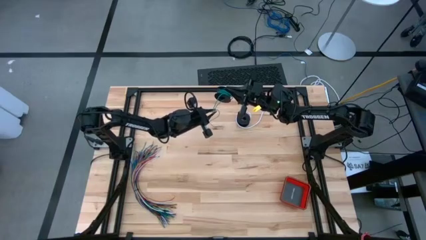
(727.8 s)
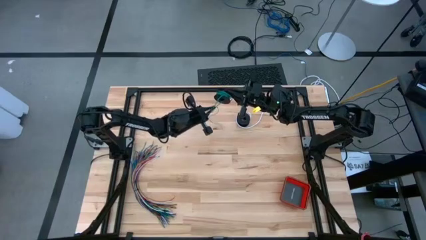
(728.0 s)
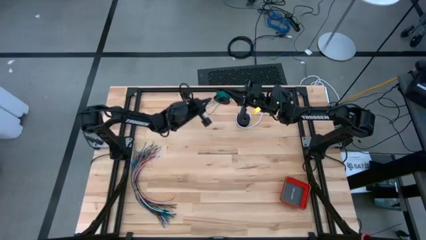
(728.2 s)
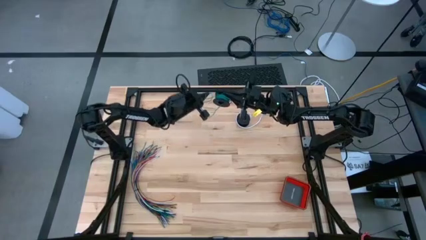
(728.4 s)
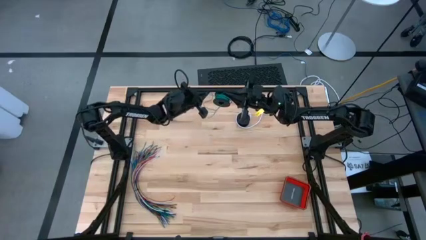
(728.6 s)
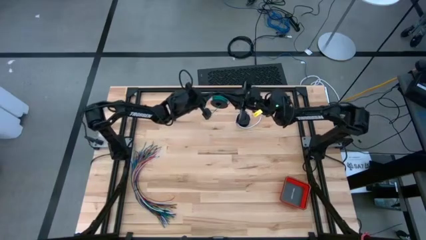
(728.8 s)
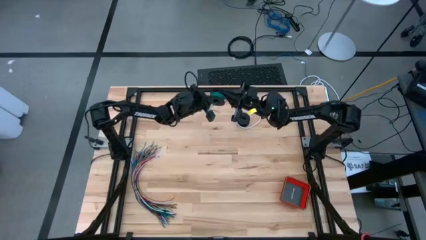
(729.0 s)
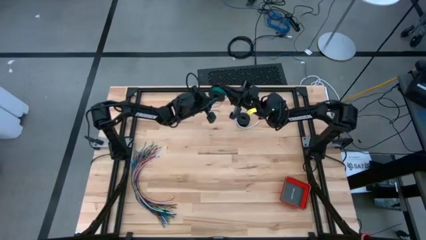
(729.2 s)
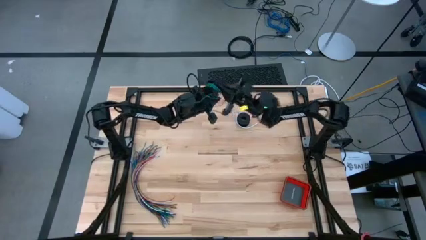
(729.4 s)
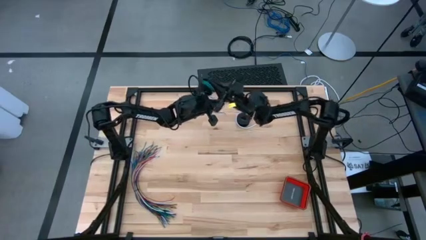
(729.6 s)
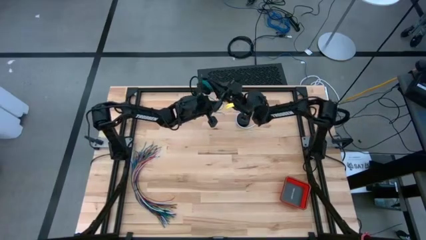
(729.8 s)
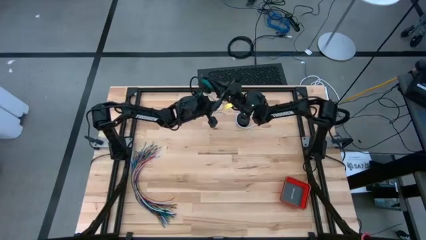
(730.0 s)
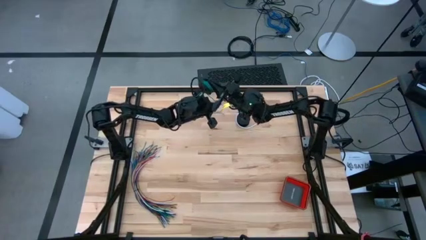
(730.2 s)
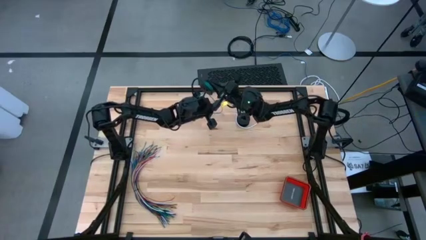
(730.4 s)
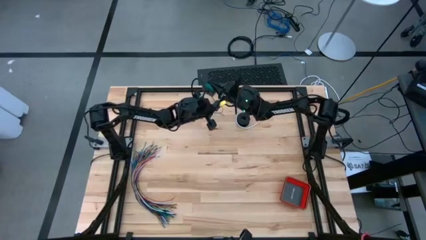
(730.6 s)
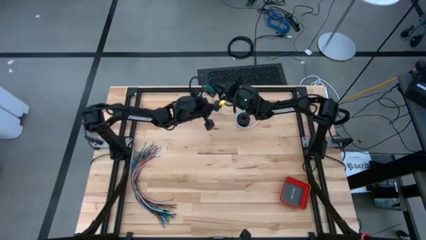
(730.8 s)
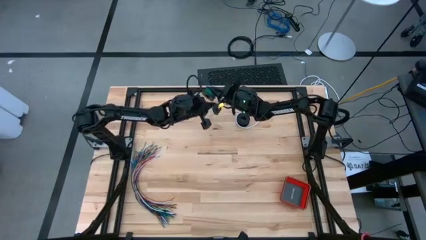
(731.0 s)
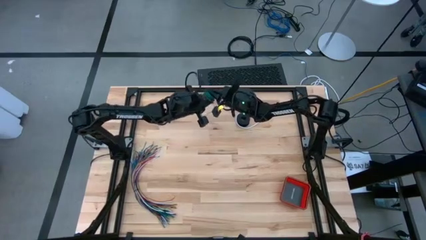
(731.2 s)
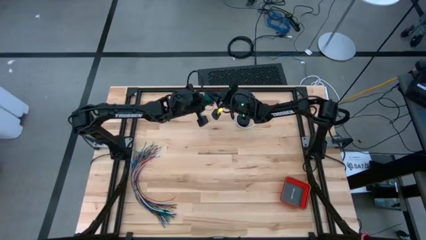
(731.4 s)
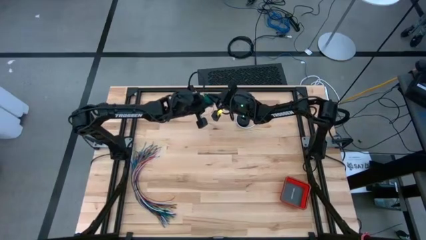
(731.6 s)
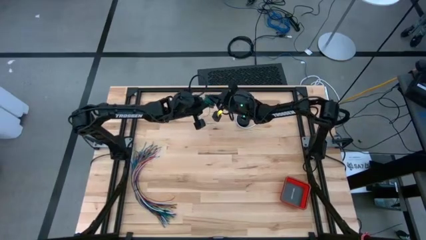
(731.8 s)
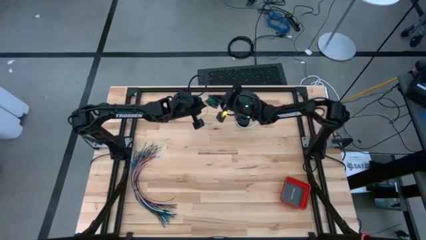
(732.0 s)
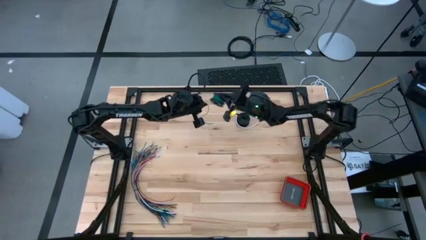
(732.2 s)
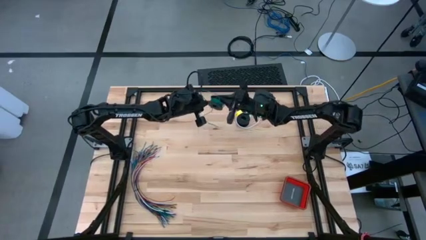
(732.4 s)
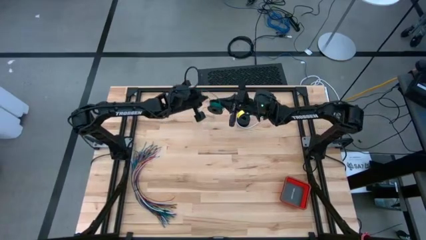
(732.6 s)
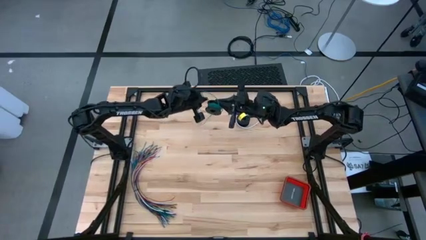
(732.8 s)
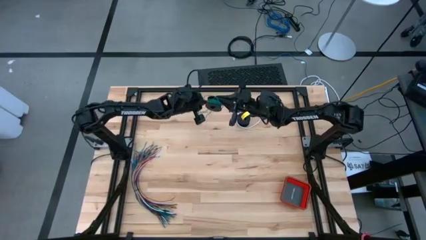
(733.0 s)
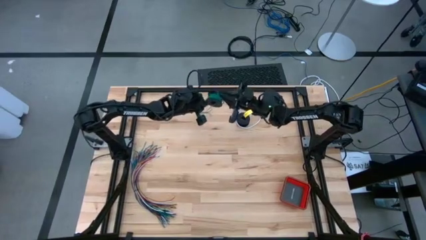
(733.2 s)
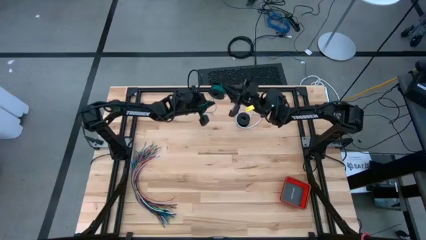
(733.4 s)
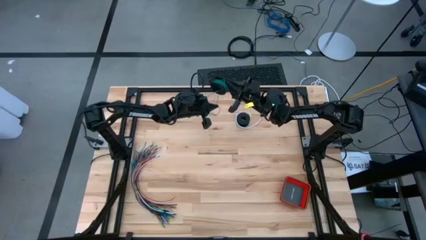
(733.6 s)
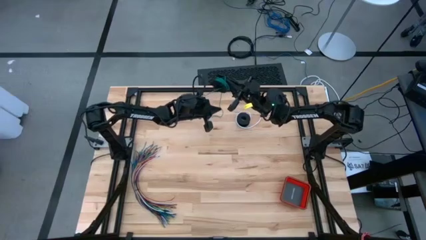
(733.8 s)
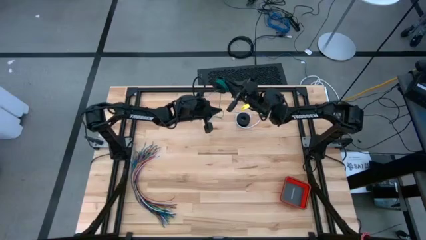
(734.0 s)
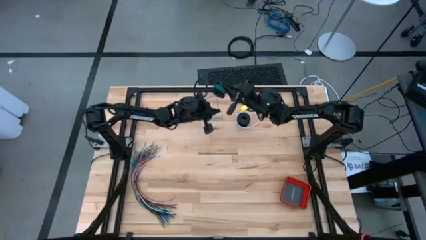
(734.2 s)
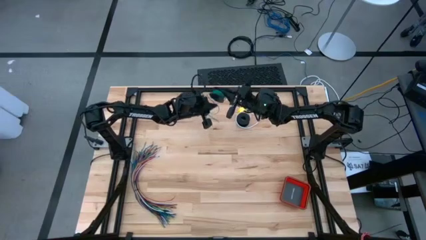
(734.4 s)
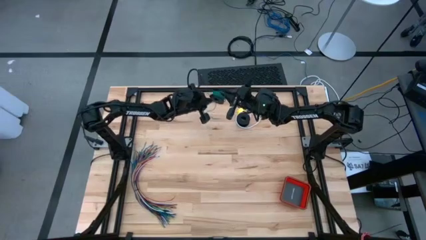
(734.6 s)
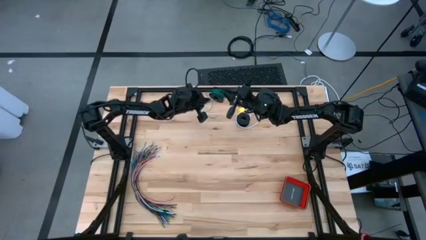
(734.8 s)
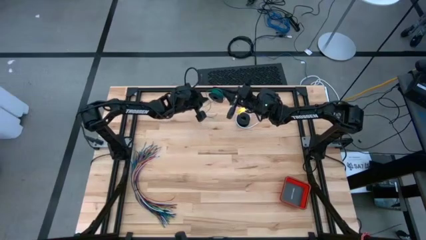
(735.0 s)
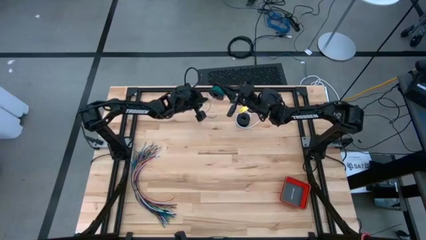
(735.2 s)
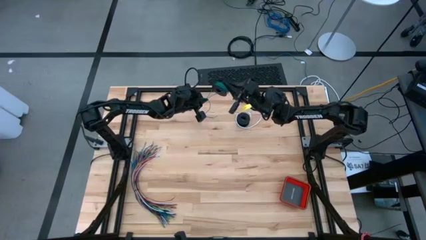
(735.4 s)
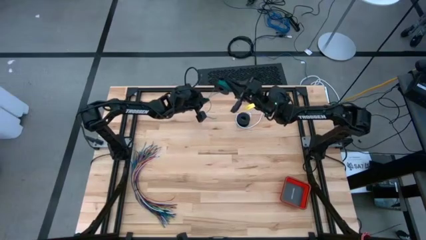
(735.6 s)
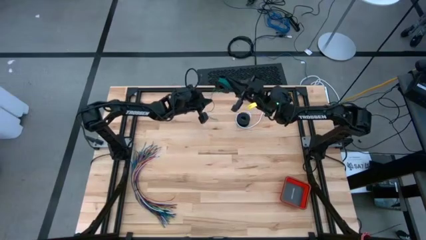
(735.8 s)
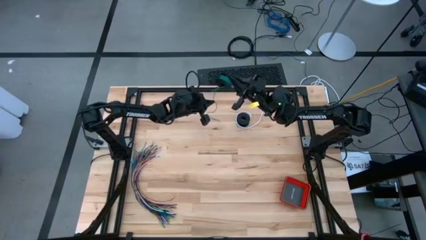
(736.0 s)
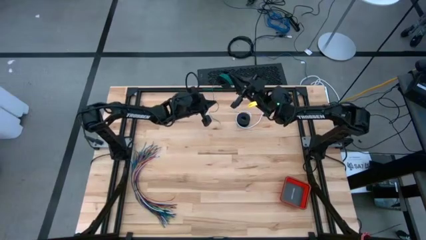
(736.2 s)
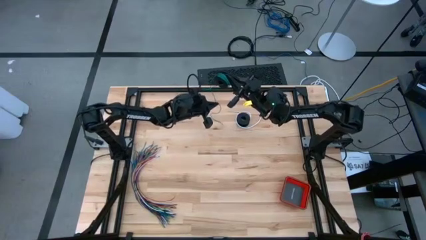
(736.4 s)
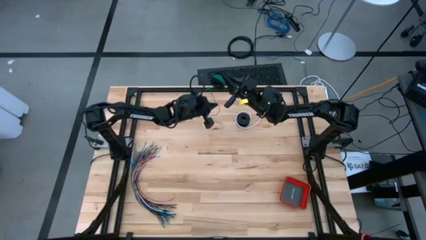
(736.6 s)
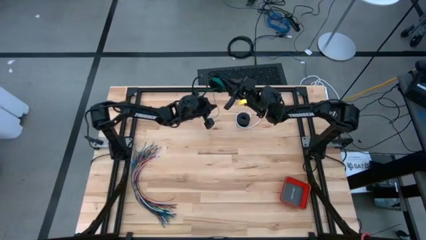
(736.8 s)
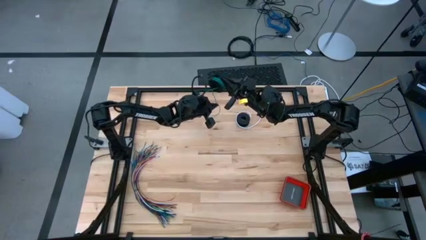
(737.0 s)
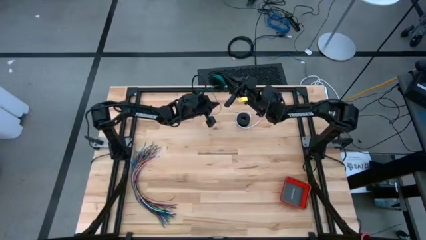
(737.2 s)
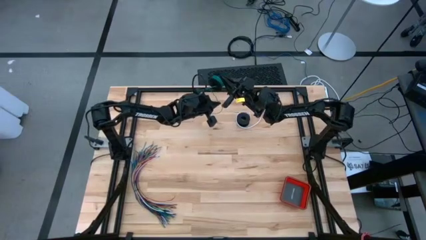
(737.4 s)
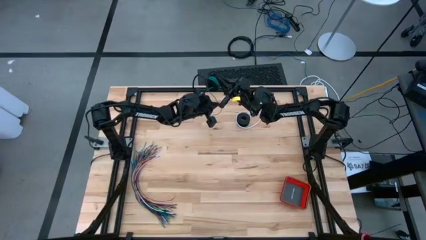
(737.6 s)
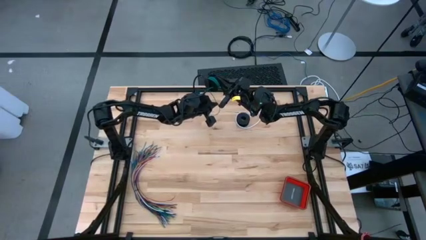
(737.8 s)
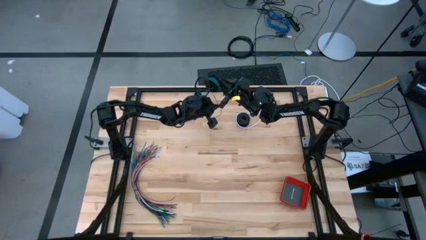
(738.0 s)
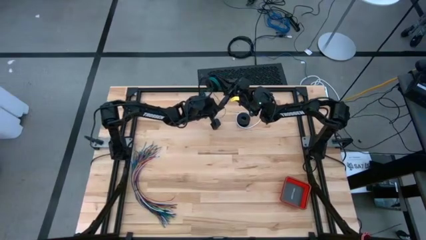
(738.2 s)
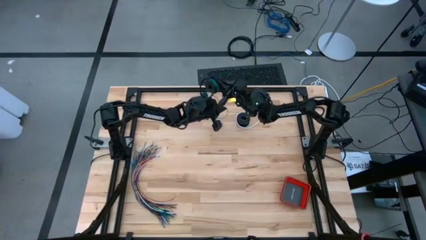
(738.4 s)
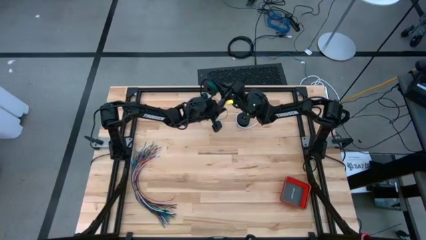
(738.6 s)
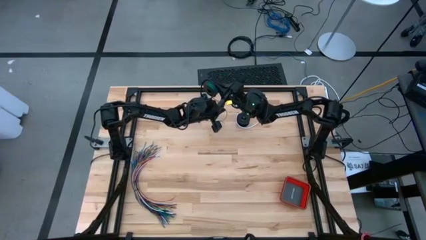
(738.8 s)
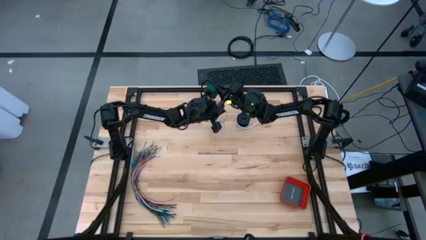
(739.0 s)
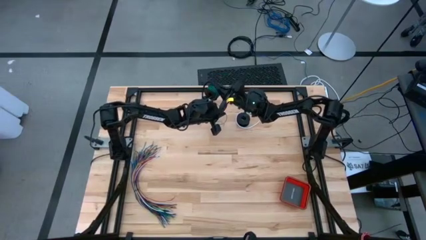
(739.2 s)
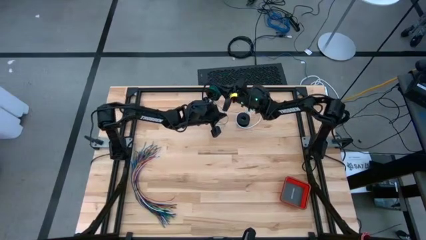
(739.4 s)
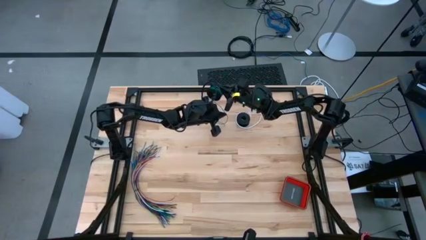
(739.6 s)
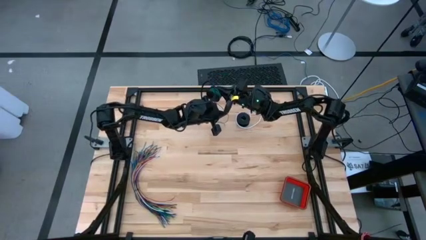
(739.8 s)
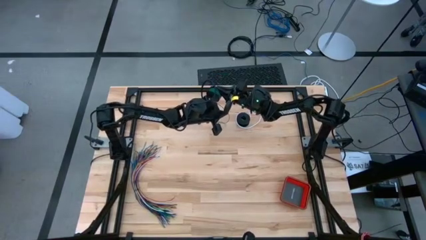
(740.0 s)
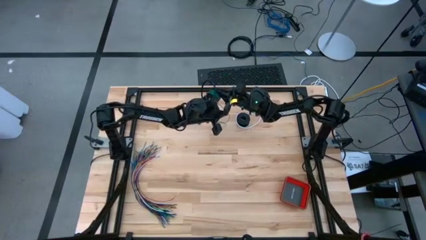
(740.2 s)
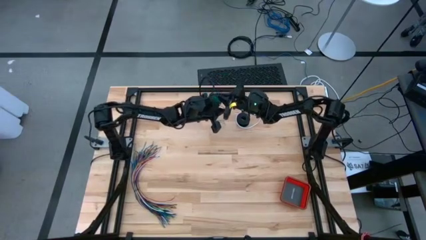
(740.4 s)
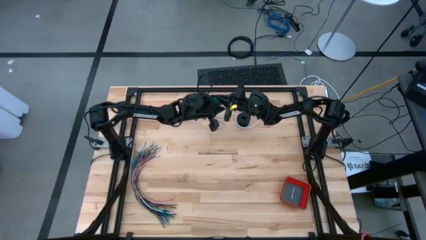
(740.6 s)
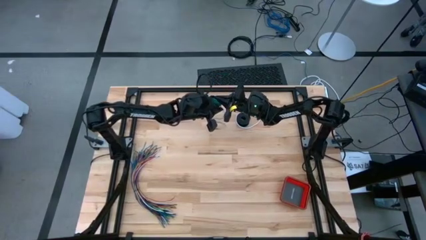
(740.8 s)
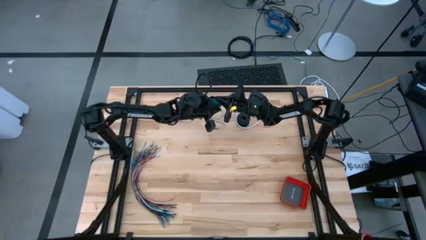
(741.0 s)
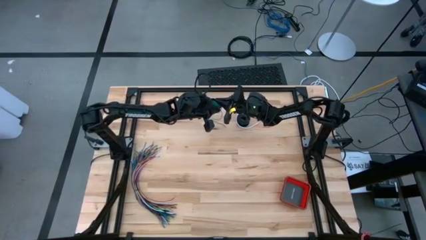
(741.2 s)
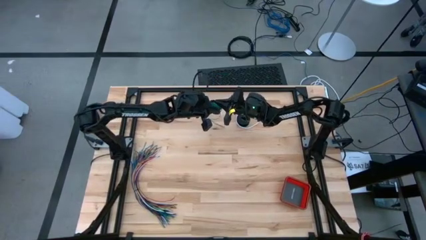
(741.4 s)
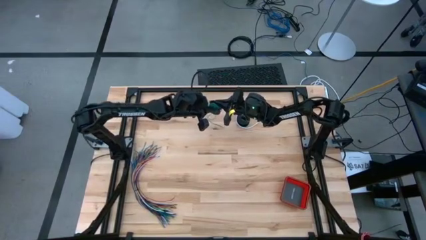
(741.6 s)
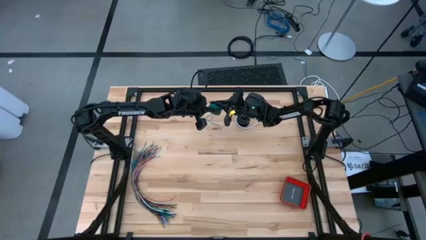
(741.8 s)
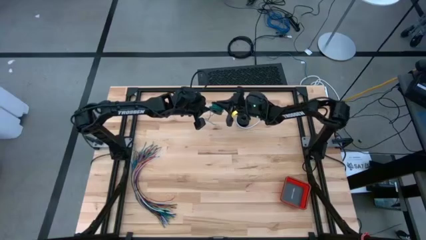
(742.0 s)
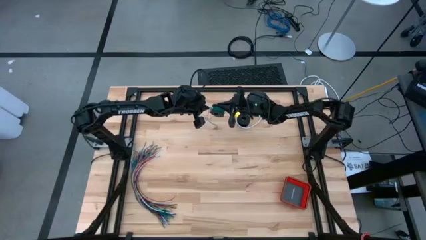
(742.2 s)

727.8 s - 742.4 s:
Task: Coil cords
Coil the green wire onto the spool

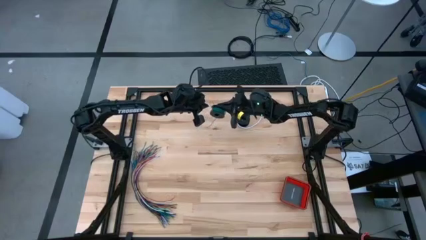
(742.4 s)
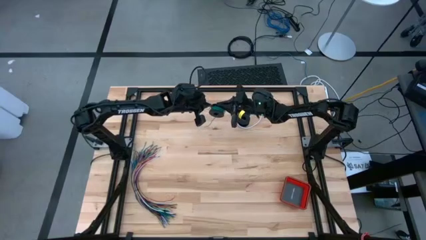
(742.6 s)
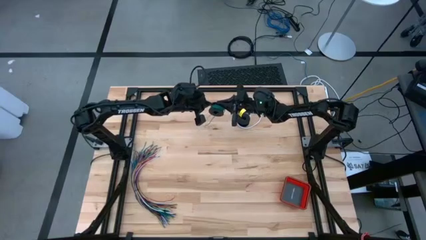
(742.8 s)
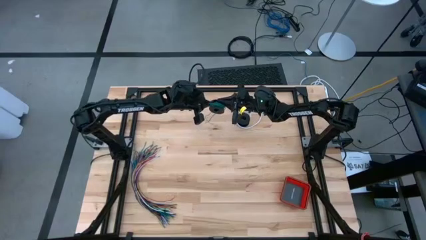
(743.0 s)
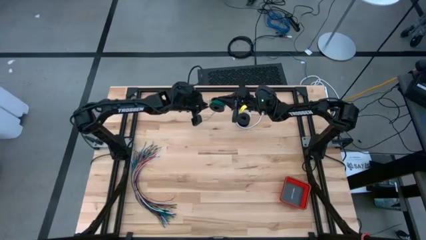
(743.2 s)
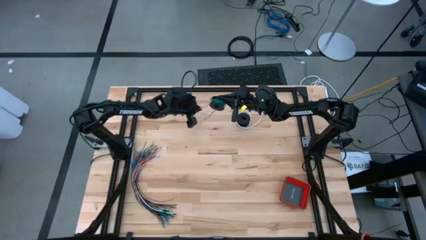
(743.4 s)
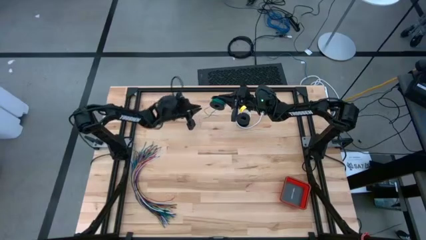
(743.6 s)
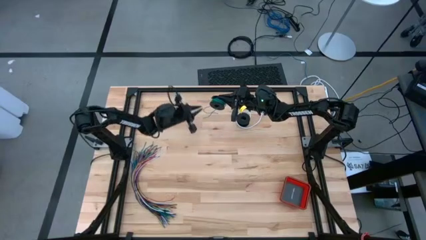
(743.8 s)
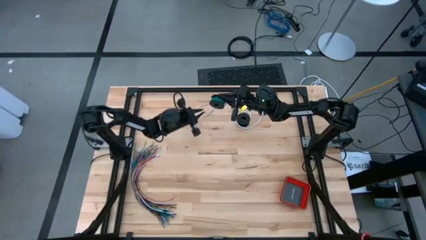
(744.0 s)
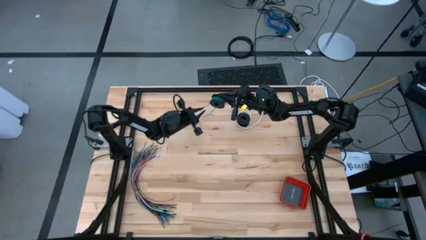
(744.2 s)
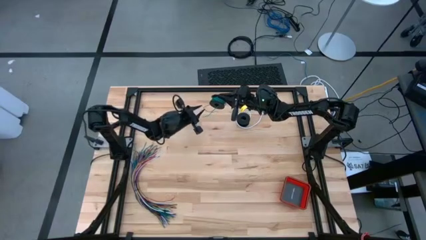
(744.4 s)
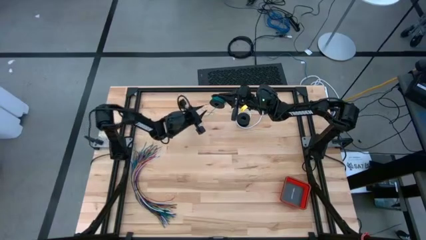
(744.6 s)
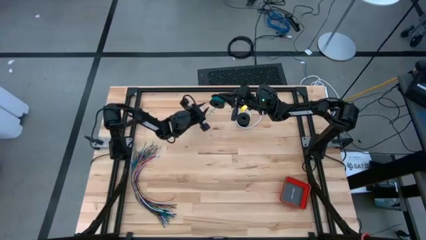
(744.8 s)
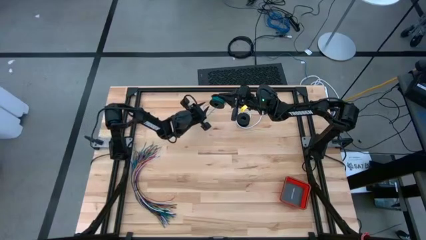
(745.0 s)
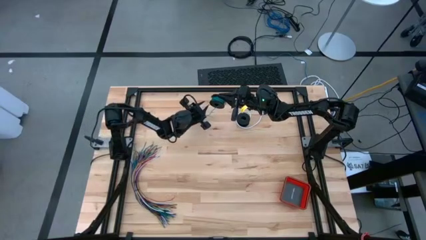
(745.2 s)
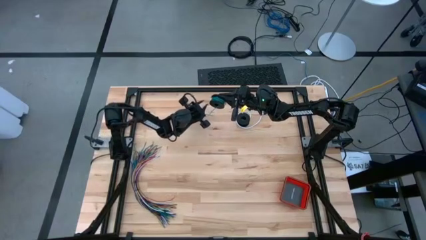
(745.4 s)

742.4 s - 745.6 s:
Coil the green wire onto the spool
